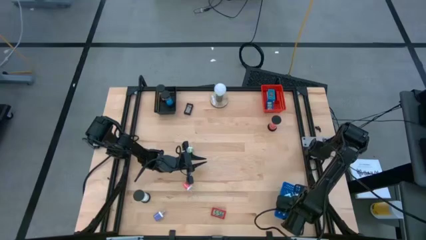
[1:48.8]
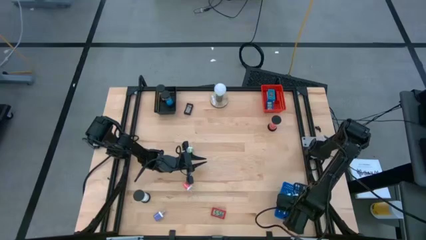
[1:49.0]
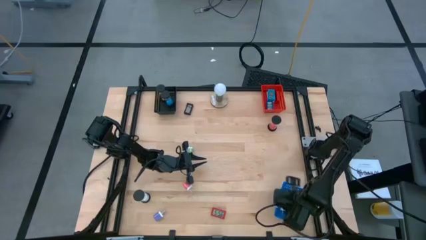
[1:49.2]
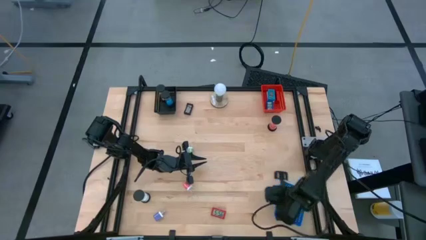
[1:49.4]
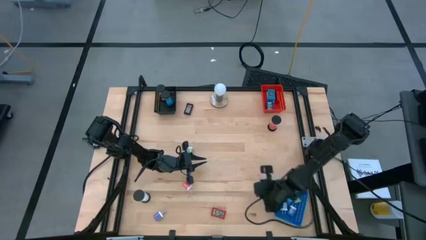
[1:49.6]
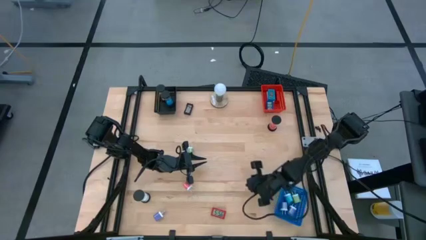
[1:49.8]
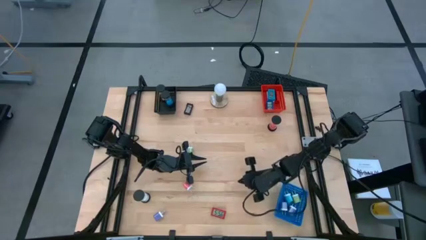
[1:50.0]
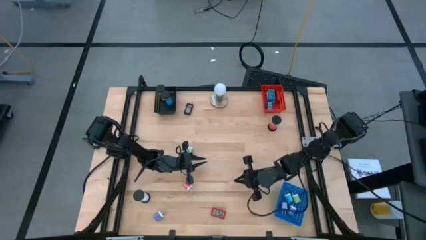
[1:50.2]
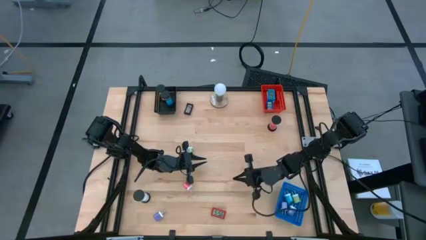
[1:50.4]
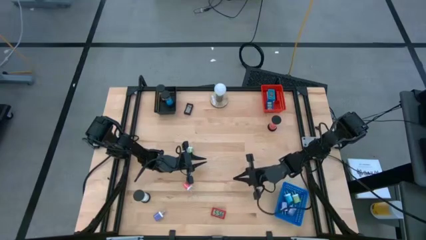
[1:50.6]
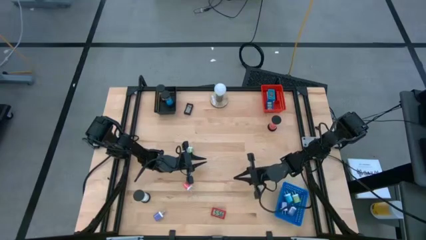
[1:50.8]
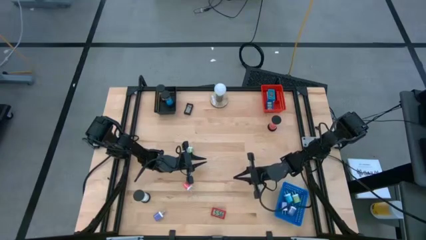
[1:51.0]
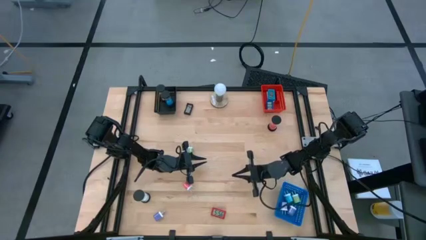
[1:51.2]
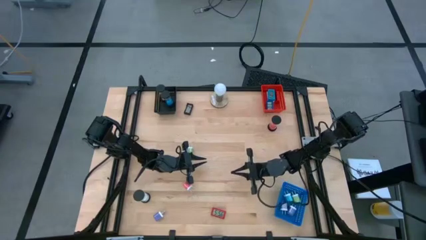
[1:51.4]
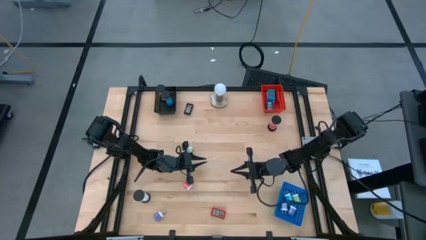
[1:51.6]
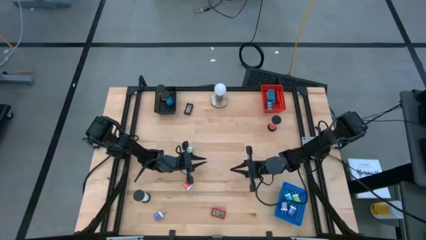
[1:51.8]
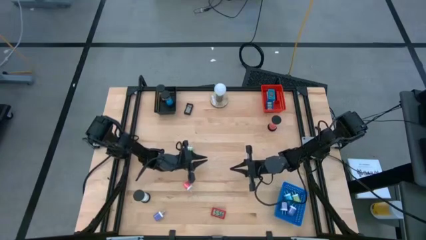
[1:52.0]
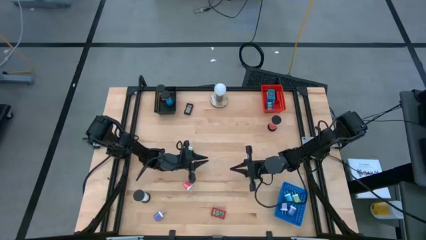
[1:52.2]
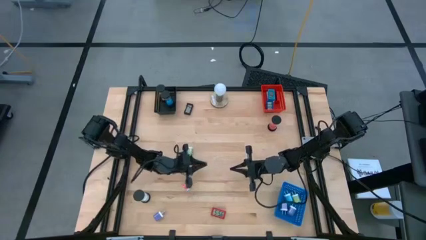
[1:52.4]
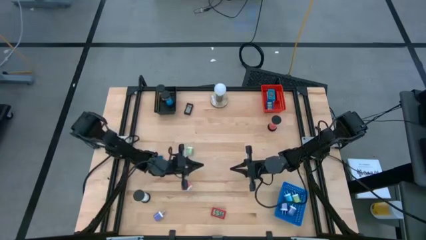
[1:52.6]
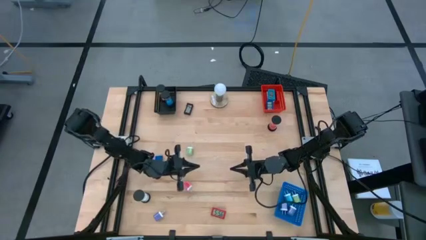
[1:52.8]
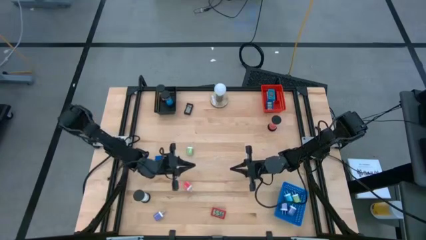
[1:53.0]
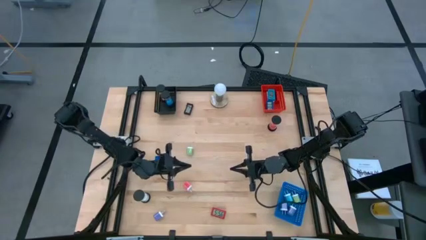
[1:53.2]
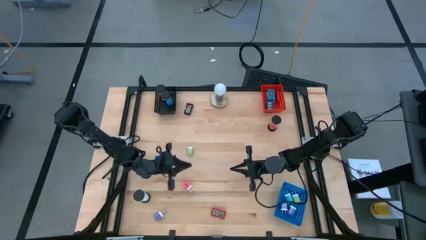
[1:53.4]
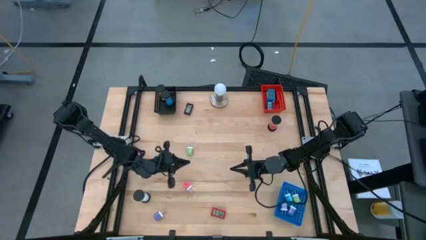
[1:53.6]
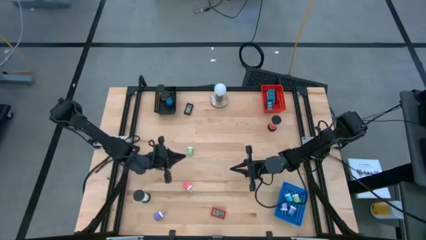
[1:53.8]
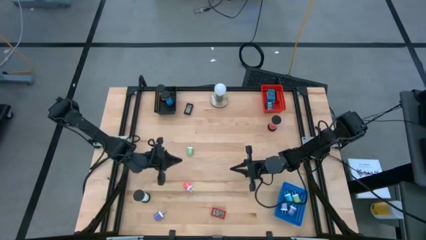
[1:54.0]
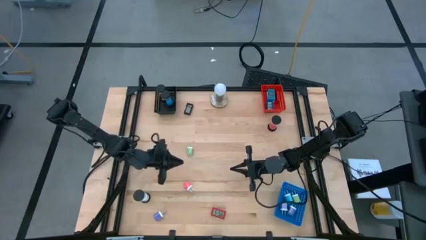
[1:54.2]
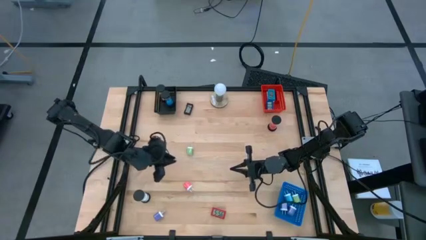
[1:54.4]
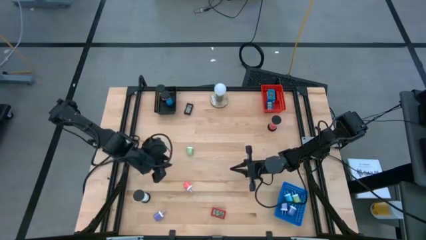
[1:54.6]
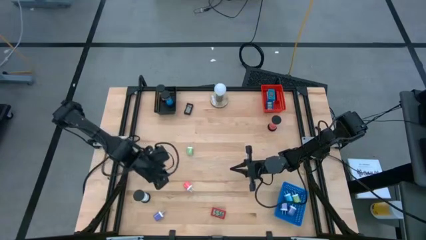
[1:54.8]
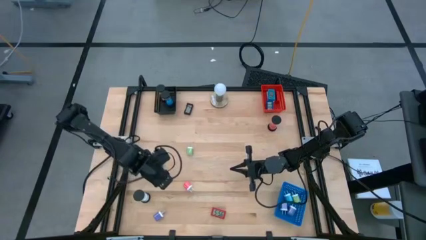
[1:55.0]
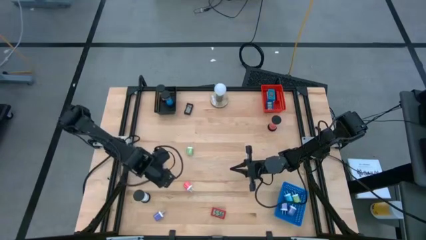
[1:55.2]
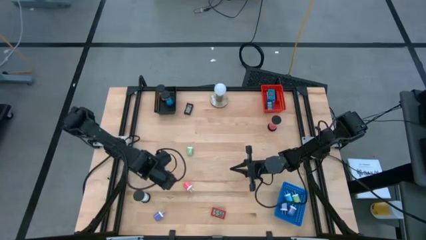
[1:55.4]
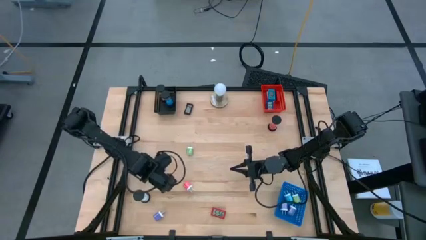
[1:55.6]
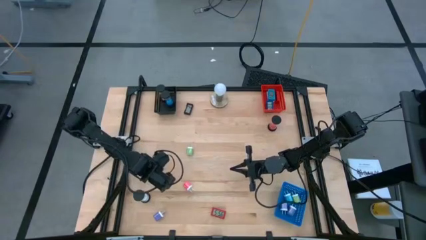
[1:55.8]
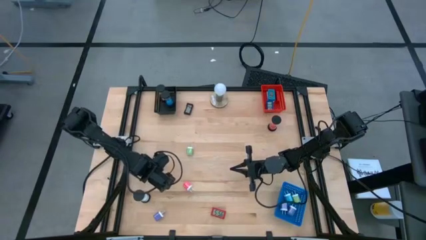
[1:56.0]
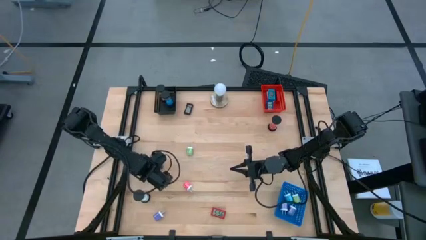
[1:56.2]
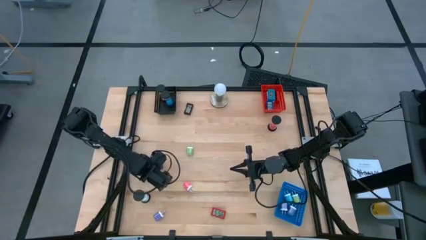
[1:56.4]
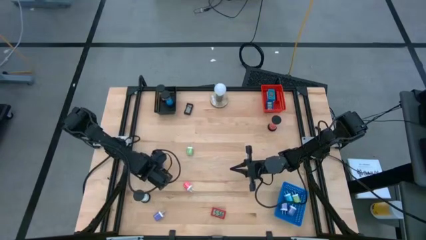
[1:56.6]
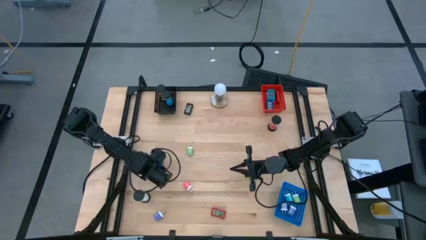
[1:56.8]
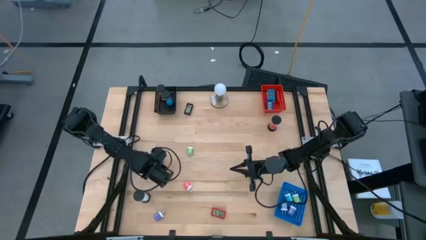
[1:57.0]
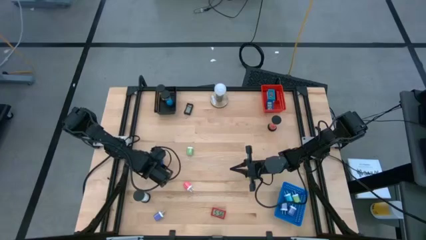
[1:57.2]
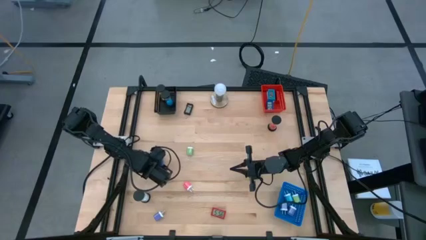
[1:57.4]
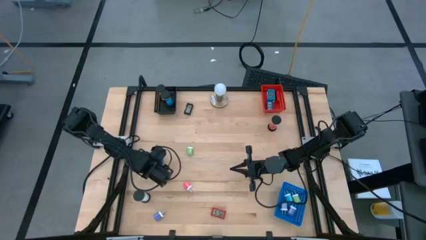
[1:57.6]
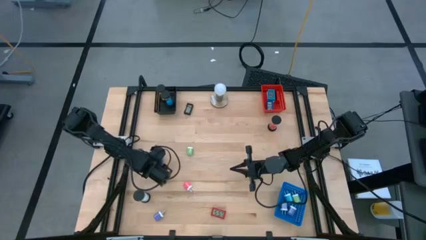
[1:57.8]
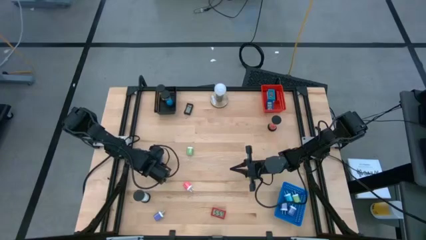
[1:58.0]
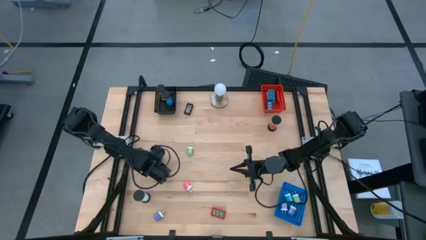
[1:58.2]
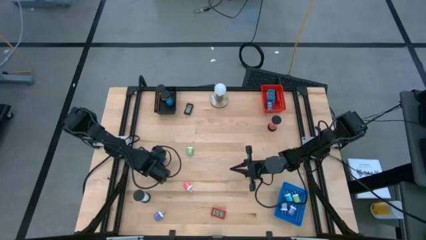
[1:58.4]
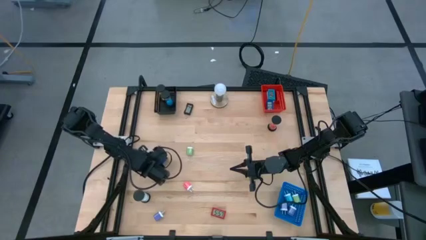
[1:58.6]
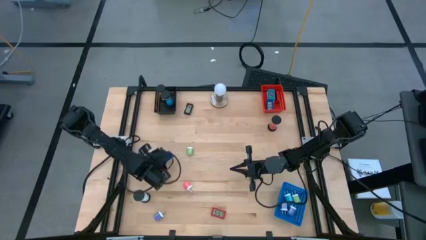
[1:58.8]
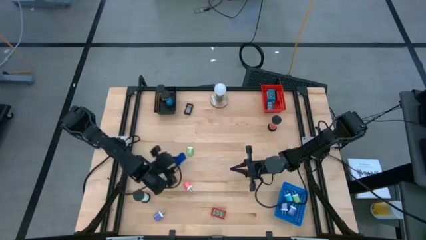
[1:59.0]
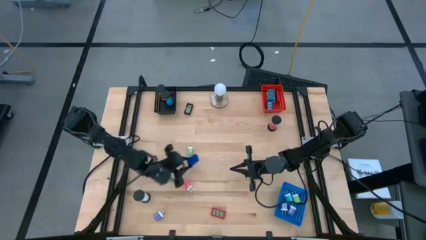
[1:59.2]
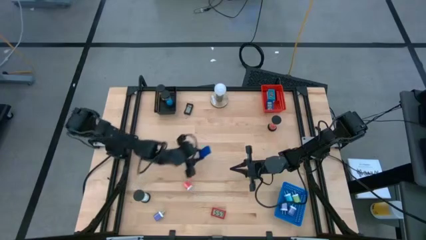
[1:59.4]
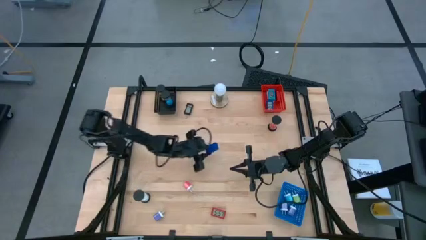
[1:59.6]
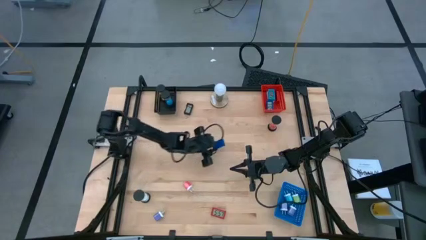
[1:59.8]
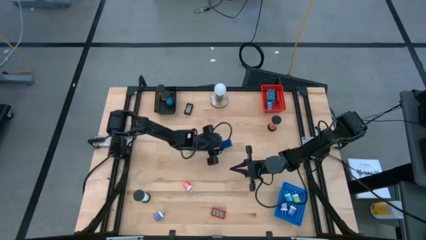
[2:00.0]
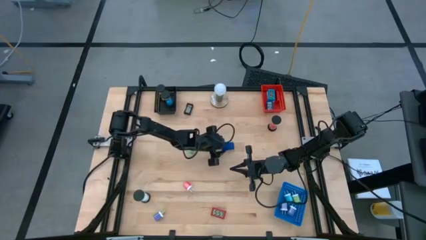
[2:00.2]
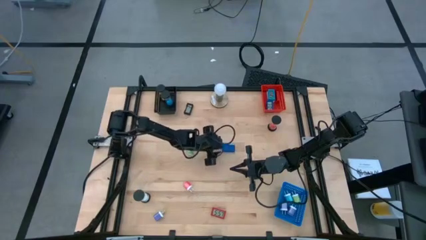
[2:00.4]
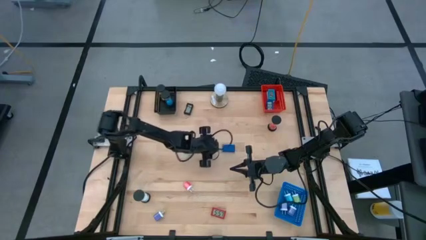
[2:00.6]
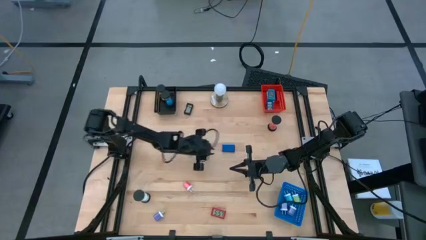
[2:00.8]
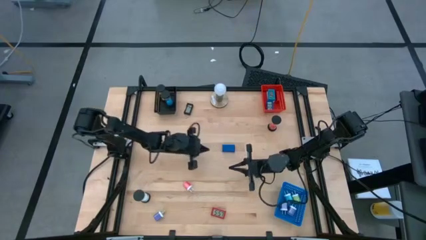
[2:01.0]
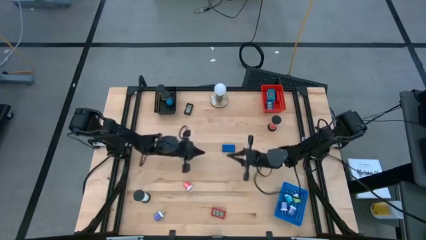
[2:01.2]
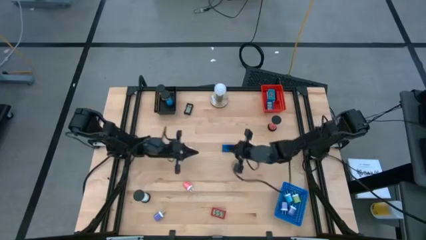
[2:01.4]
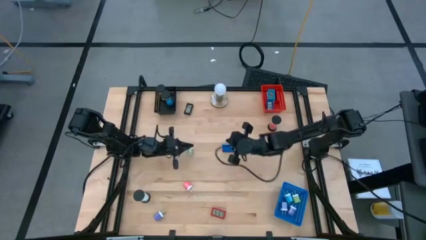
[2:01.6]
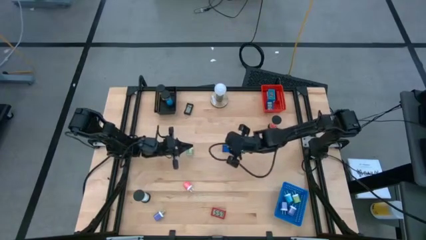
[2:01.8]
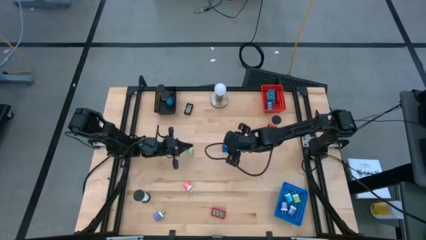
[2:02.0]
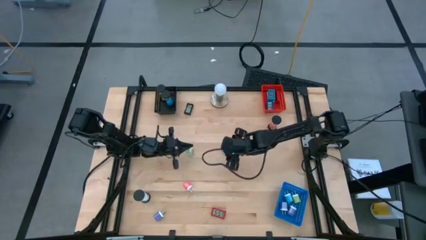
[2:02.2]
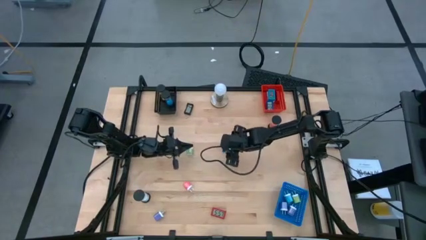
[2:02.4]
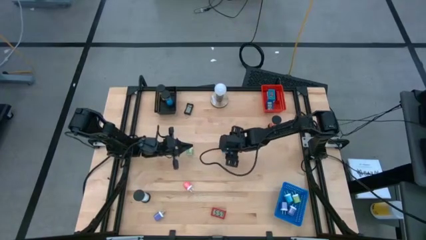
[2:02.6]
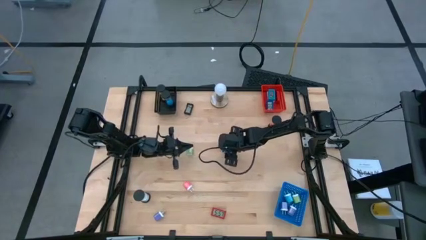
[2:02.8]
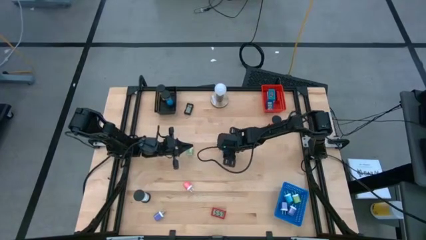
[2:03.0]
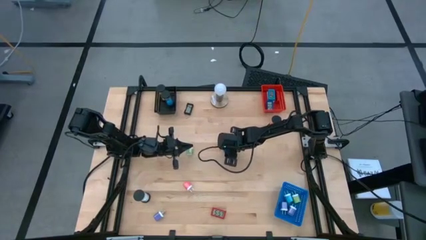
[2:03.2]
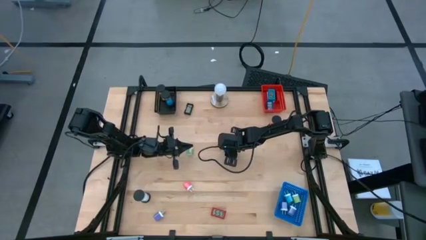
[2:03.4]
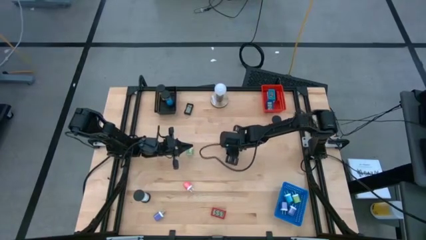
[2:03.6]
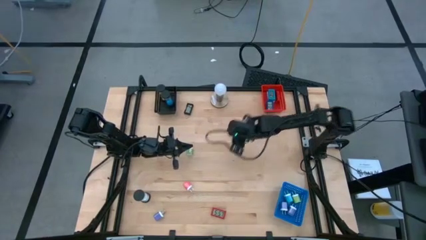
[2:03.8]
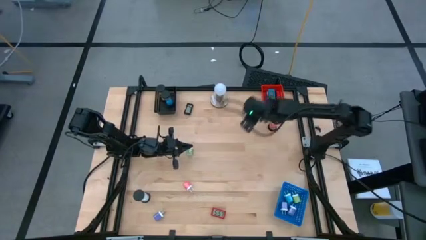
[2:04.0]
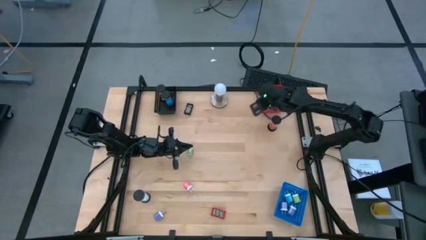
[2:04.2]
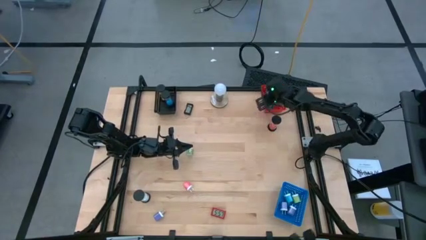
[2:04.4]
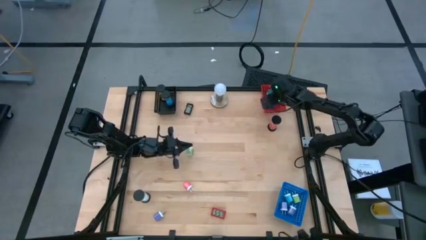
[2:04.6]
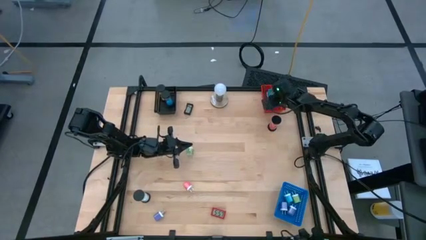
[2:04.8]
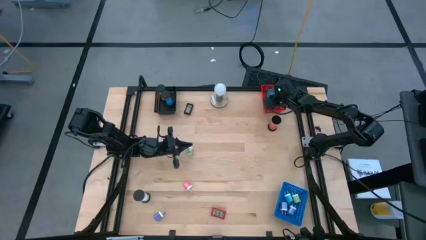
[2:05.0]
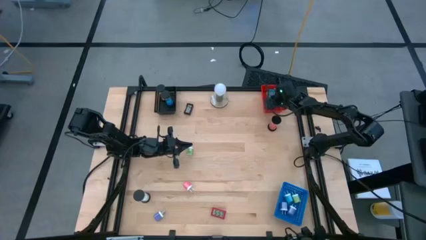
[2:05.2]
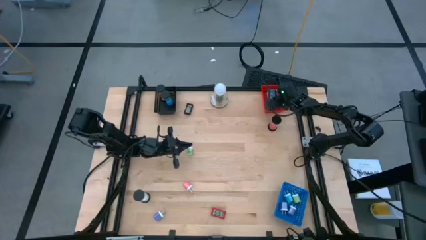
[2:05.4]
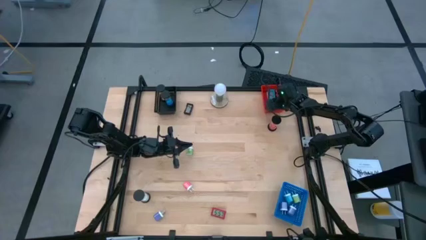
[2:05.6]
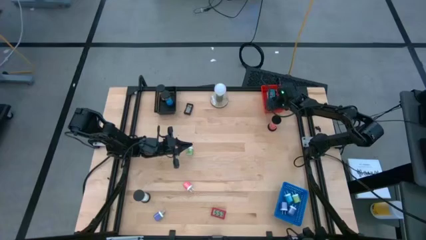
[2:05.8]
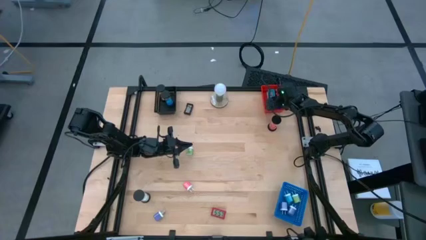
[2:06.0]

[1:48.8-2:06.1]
Task: Pick & Place Office items
Put the blue digital clock into the red bin
